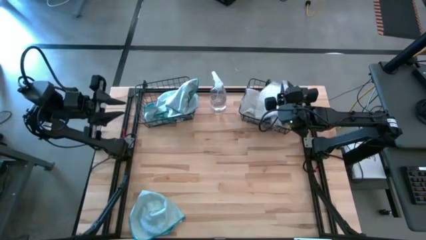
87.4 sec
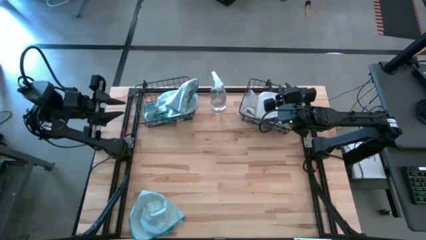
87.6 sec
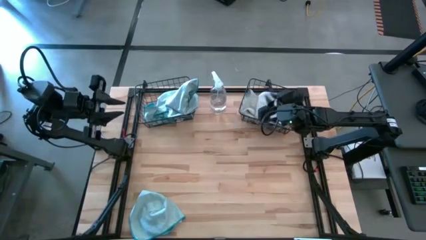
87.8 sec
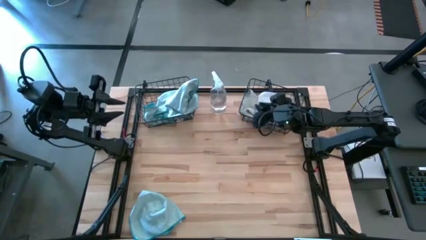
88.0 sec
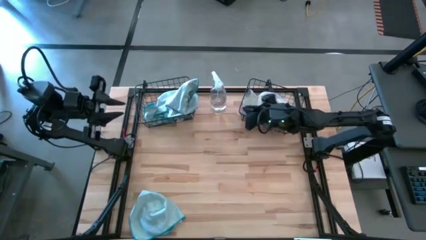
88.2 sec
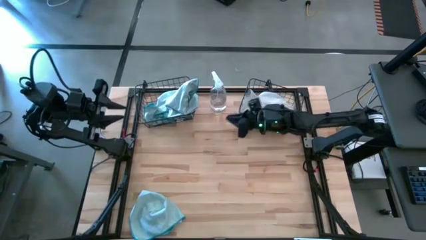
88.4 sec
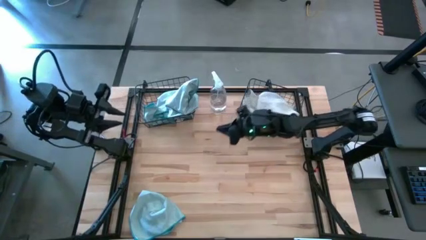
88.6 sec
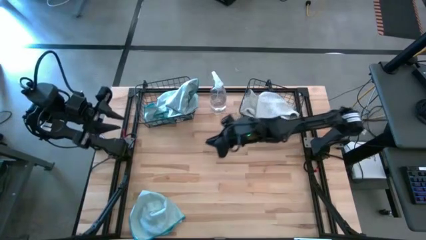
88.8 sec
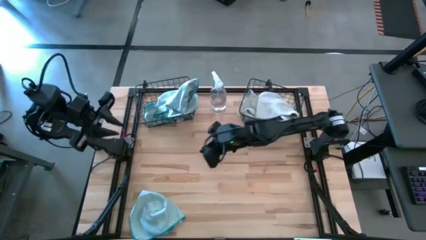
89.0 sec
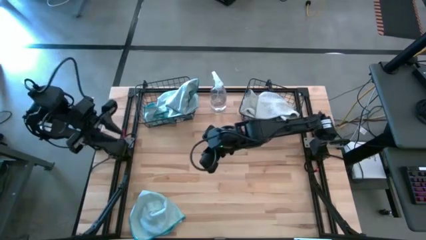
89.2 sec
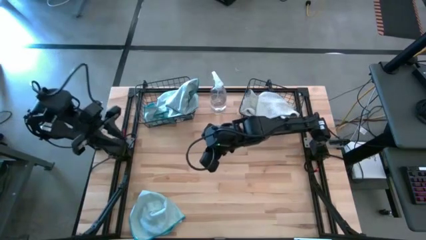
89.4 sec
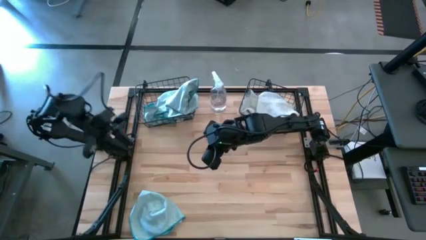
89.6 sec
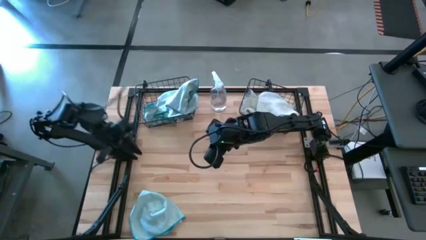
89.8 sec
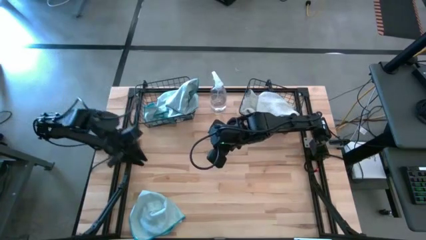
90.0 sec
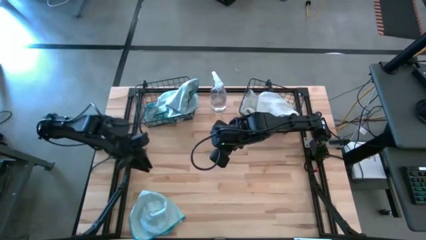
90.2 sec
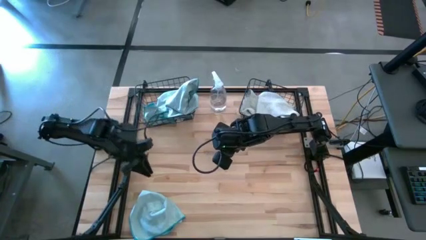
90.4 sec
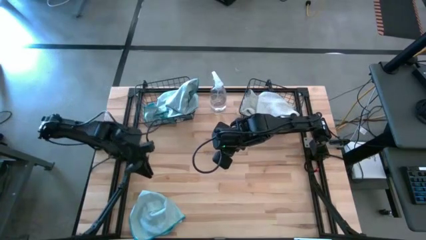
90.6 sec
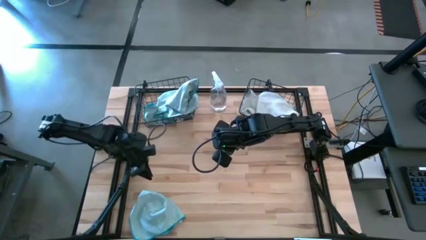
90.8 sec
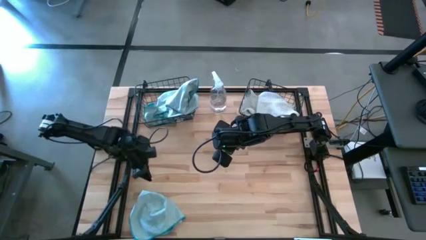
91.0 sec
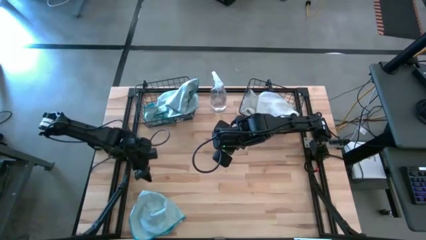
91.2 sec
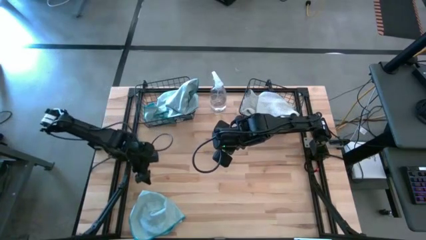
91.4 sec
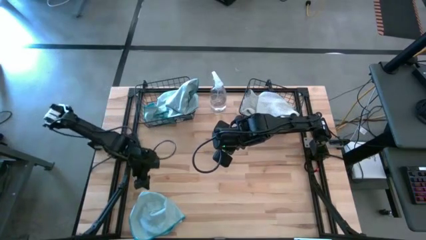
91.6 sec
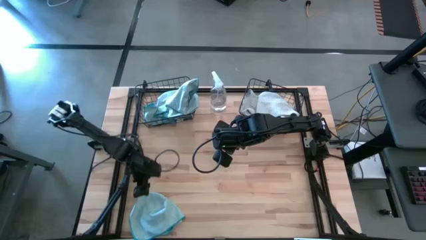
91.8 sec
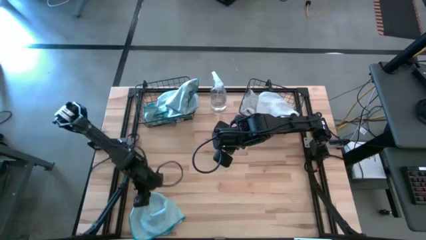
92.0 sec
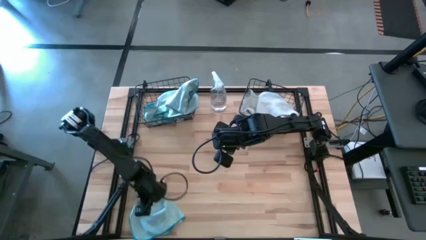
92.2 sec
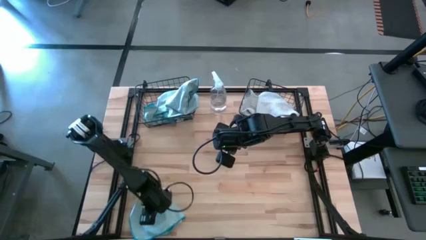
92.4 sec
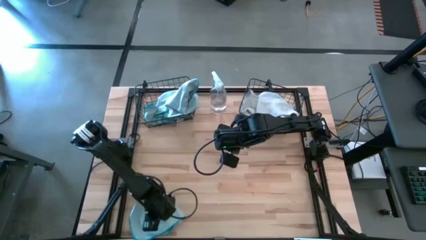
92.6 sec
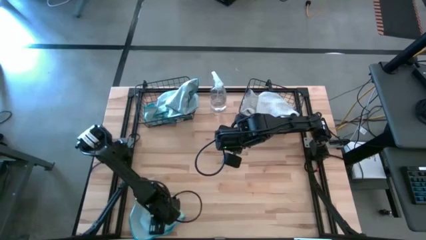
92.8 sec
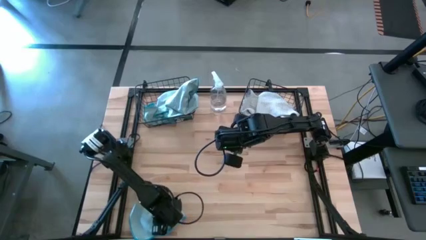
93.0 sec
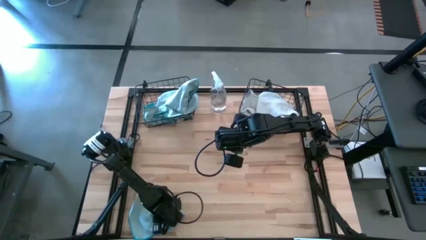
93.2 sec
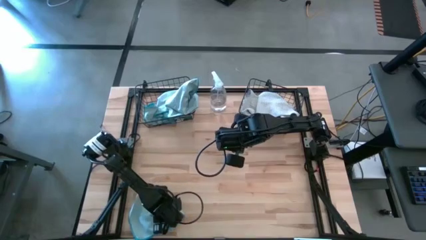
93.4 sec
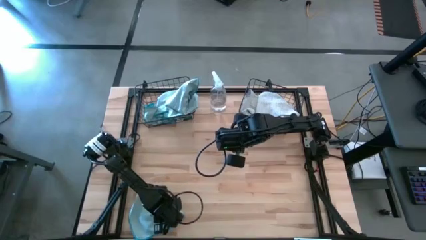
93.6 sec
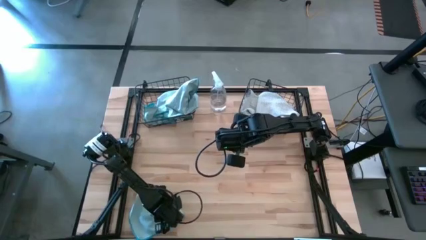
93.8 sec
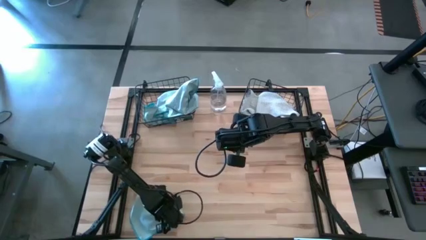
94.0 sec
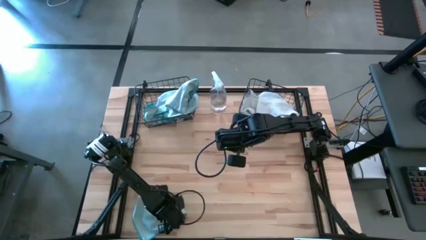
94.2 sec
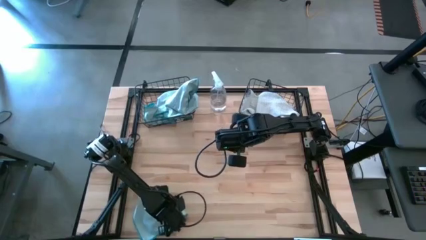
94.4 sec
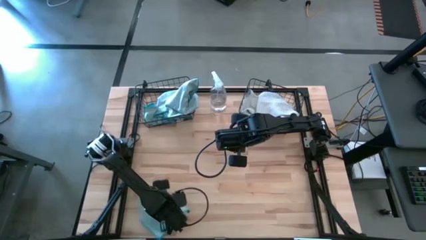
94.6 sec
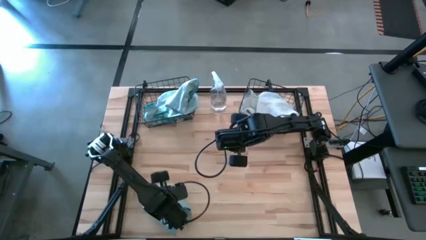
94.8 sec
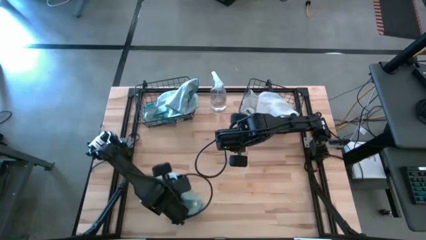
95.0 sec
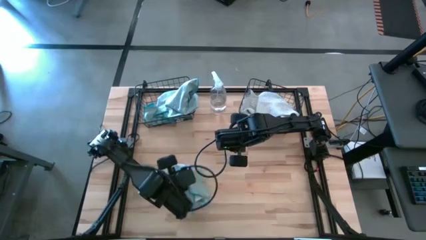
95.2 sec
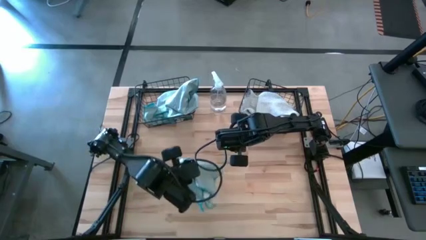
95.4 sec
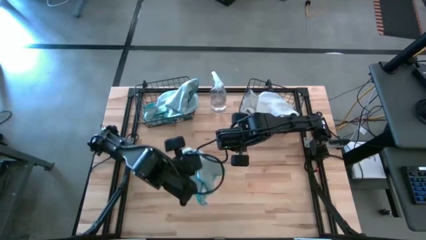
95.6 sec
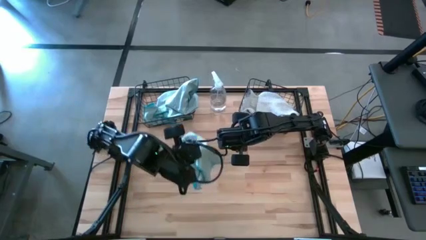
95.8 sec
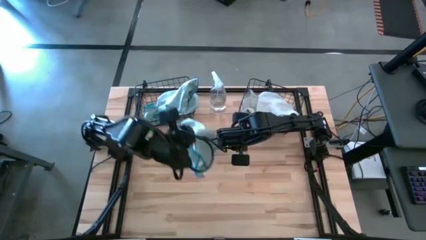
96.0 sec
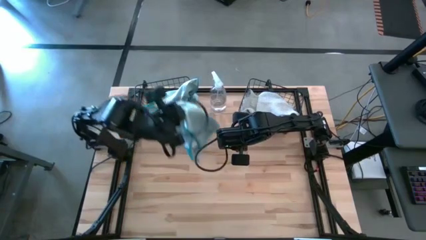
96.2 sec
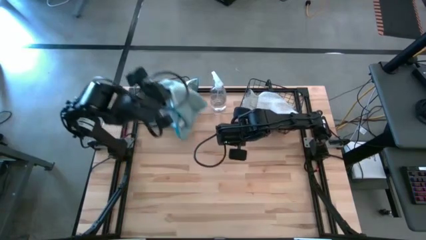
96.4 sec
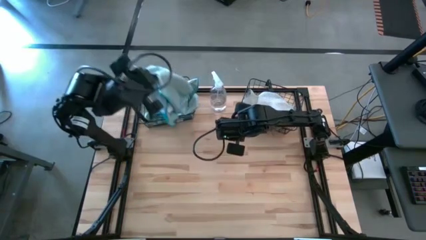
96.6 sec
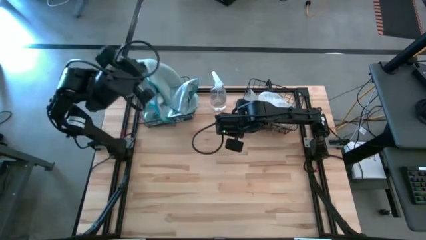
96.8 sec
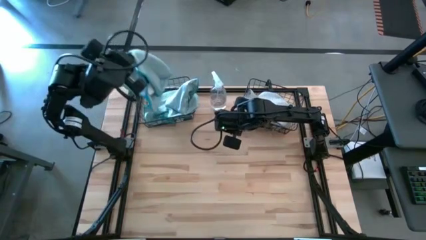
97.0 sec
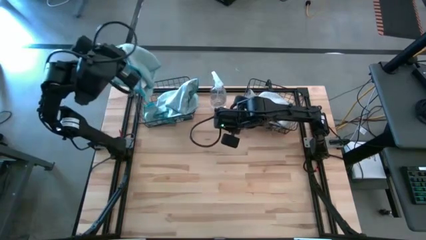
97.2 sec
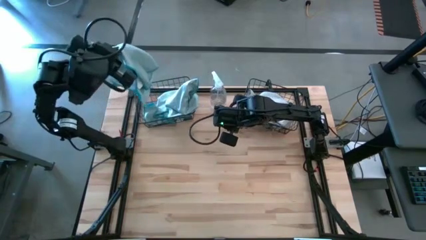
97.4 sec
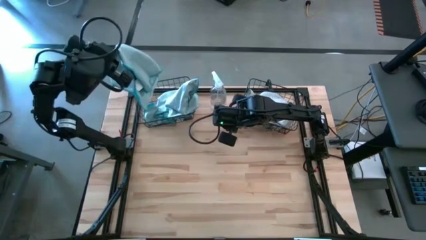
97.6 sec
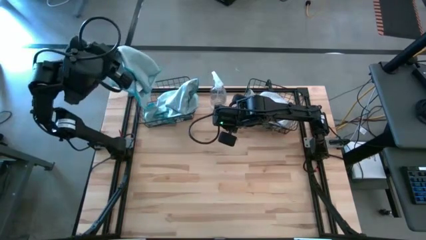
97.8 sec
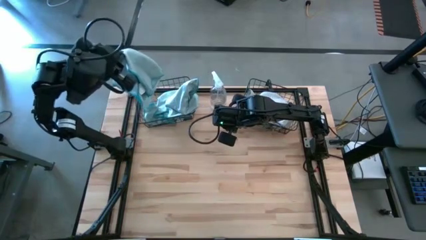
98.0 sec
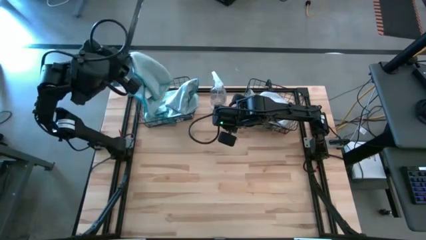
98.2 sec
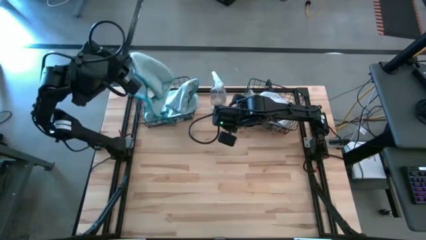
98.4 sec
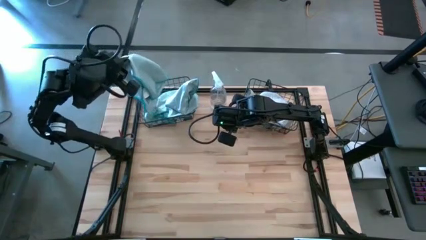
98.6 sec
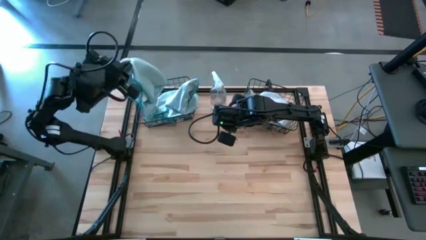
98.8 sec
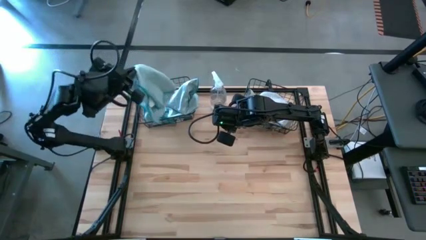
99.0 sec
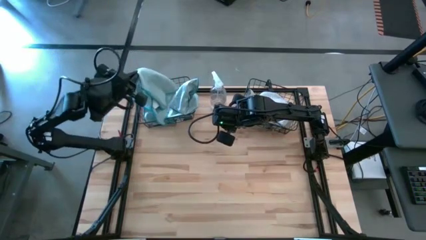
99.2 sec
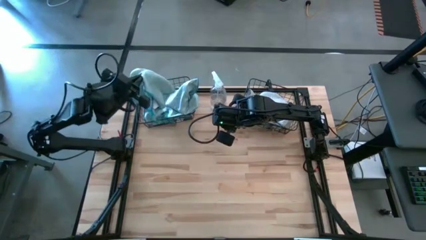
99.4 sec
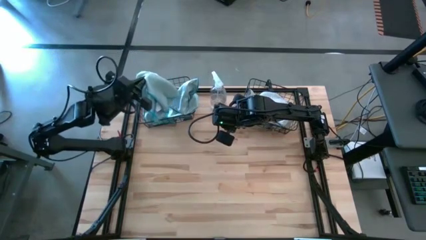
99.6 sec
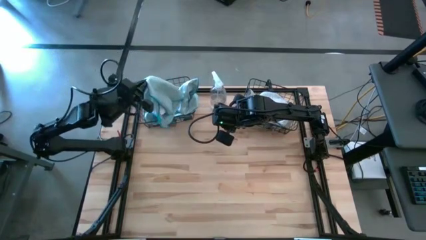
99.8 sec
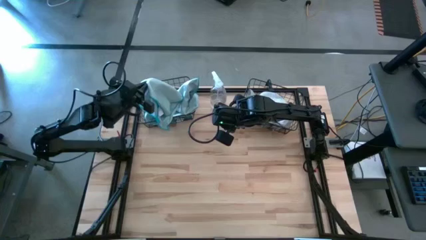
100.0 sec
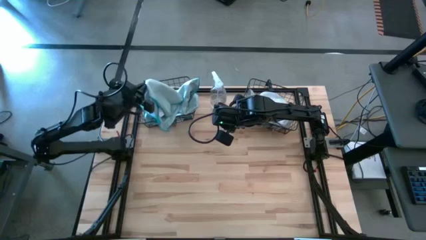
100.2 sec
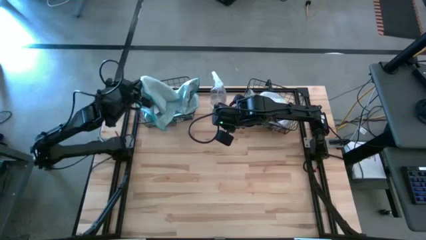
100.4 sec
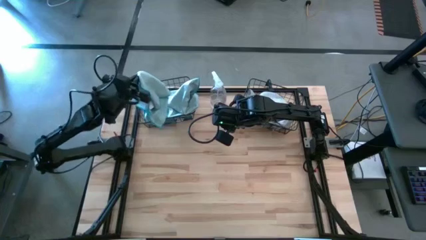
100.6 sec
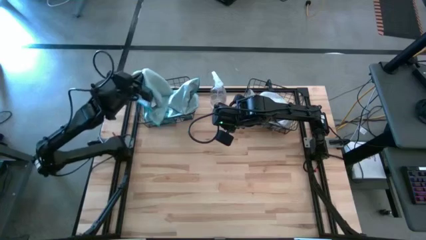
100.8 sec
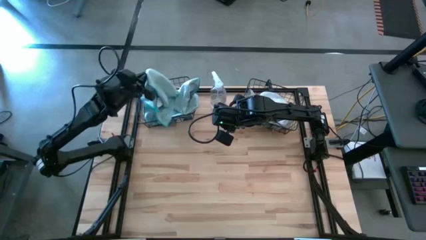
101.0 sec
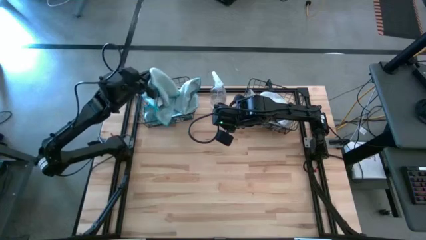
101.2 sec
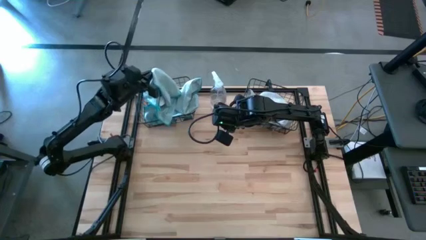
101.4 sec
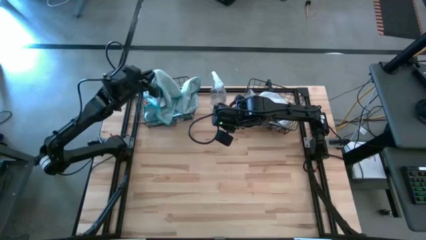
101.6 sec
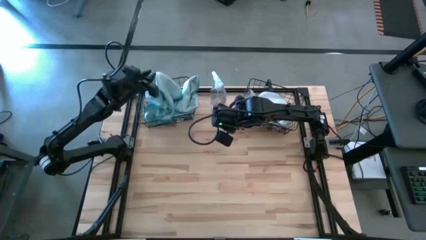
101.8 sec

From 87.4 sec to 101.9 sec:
Task: Sort microfiber towel by color & place in baskets
Put the blue microfiber towel into the left black wire basket
